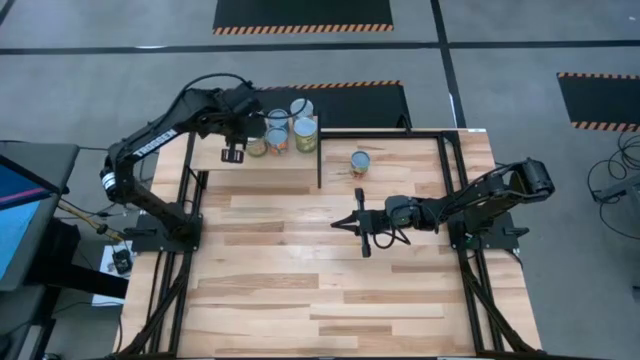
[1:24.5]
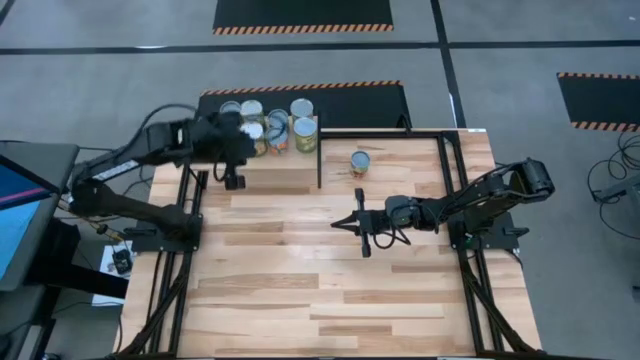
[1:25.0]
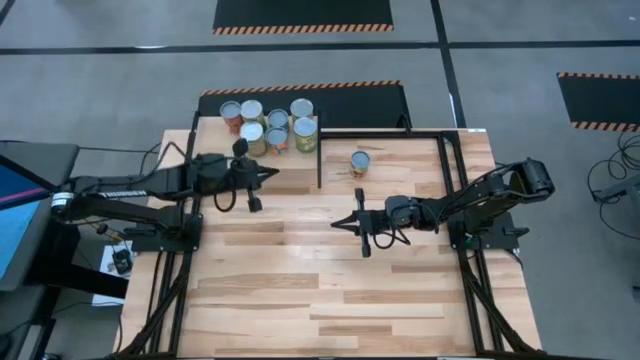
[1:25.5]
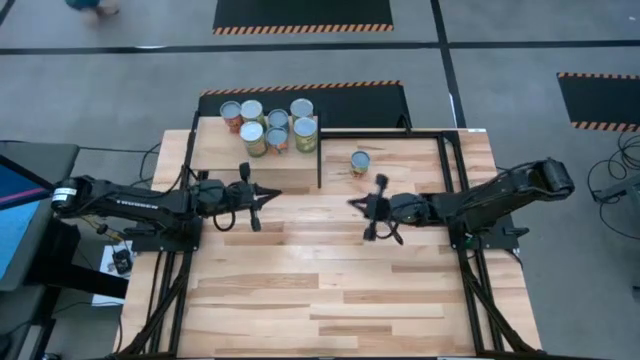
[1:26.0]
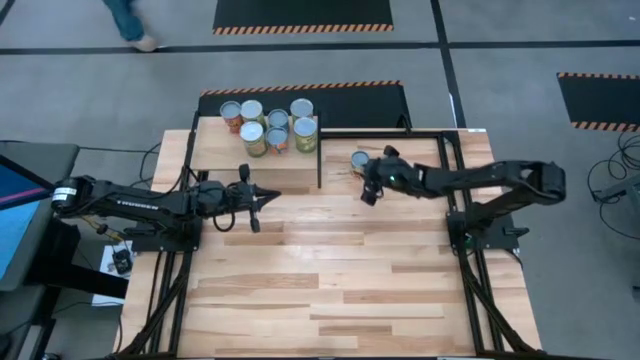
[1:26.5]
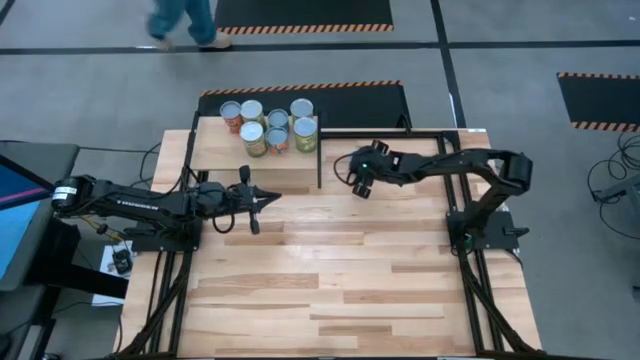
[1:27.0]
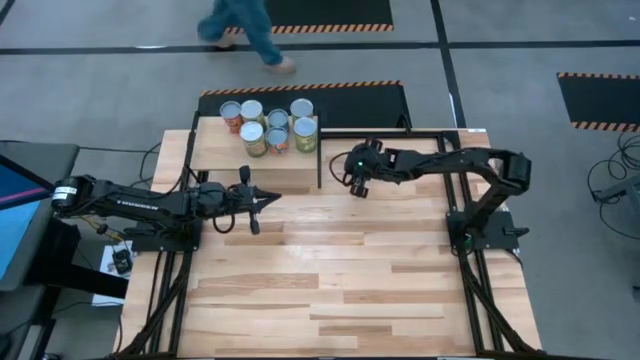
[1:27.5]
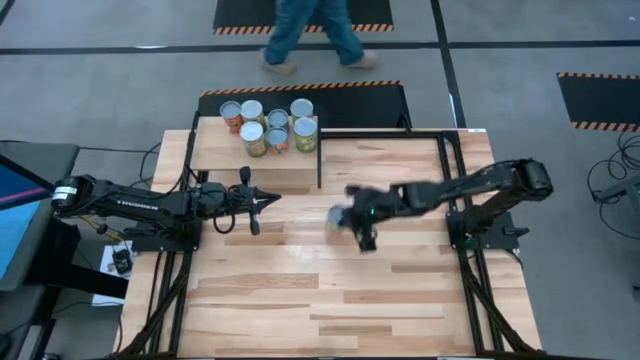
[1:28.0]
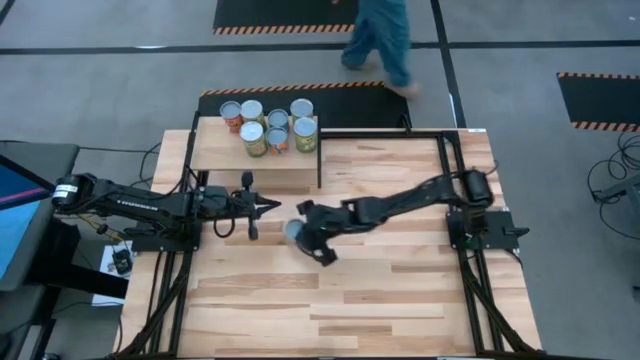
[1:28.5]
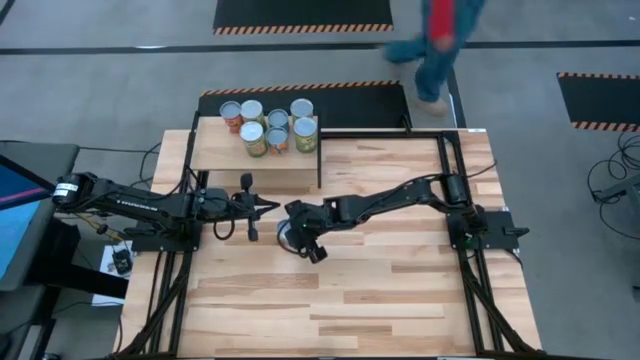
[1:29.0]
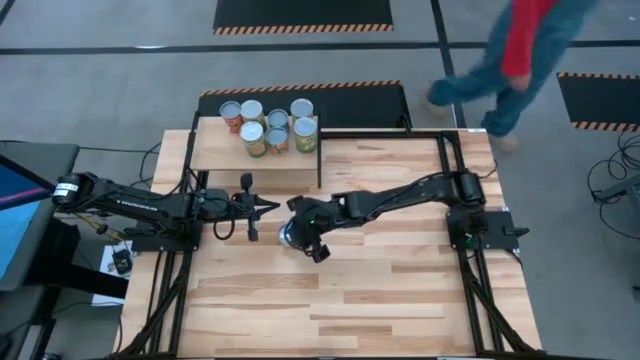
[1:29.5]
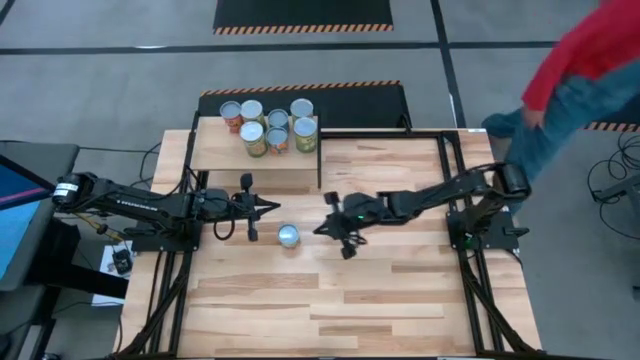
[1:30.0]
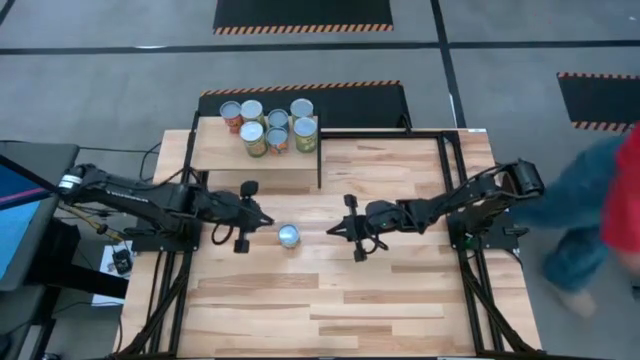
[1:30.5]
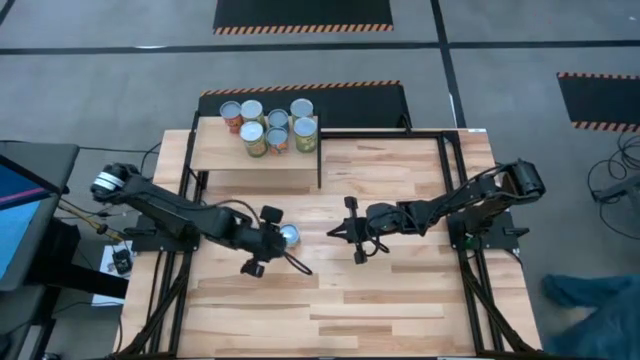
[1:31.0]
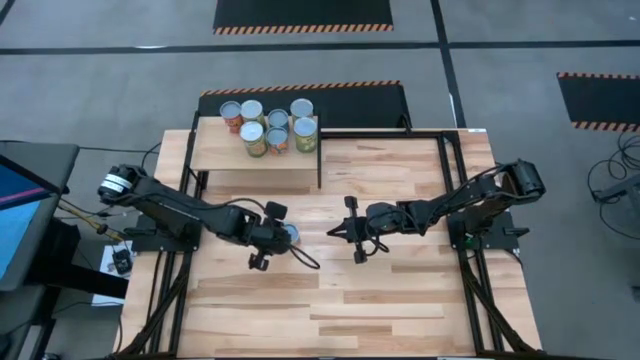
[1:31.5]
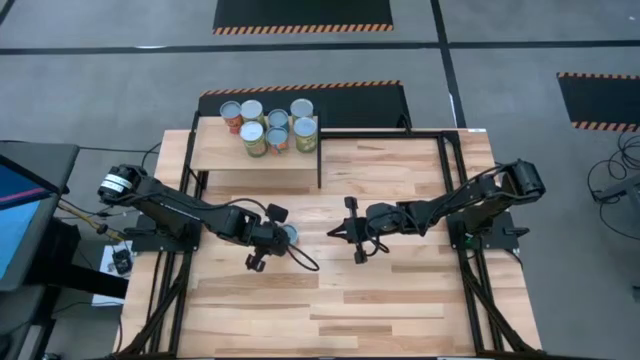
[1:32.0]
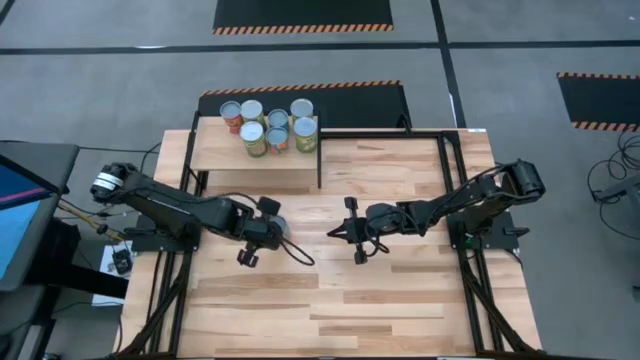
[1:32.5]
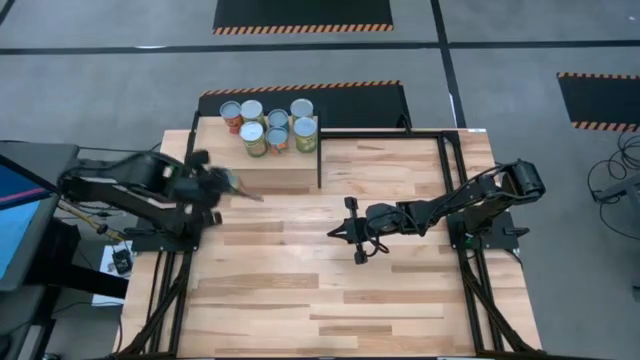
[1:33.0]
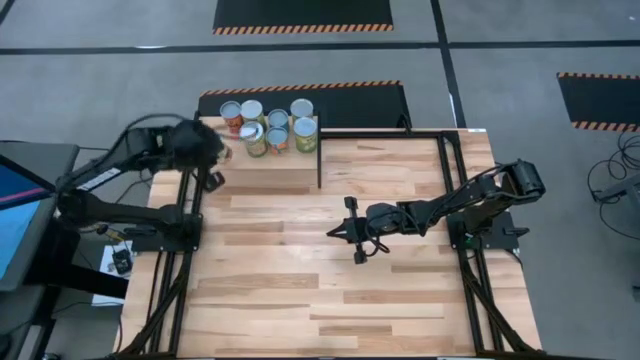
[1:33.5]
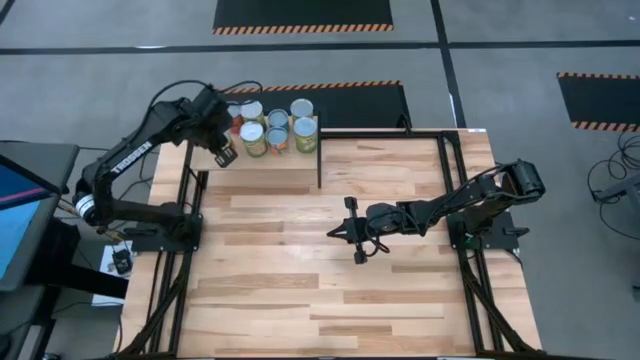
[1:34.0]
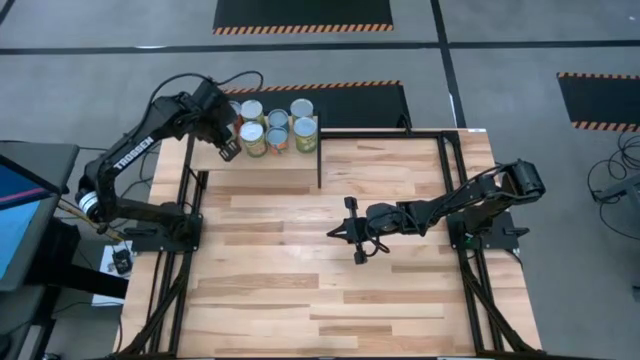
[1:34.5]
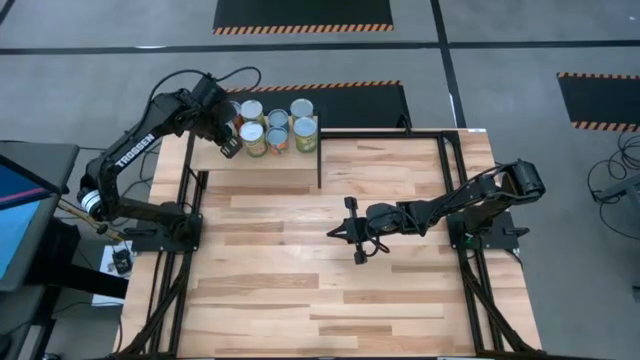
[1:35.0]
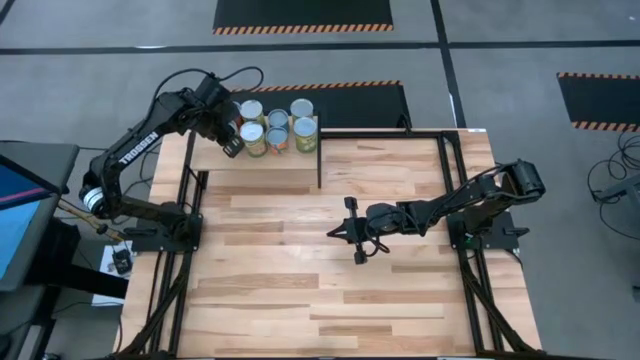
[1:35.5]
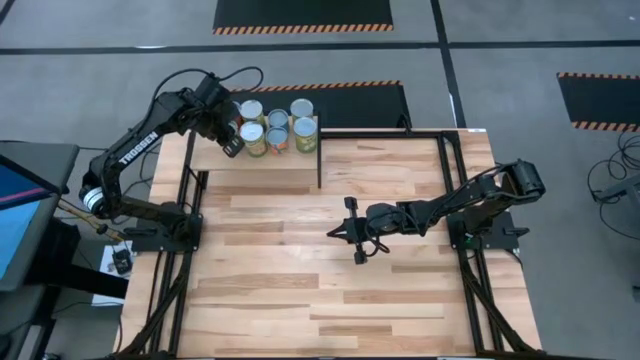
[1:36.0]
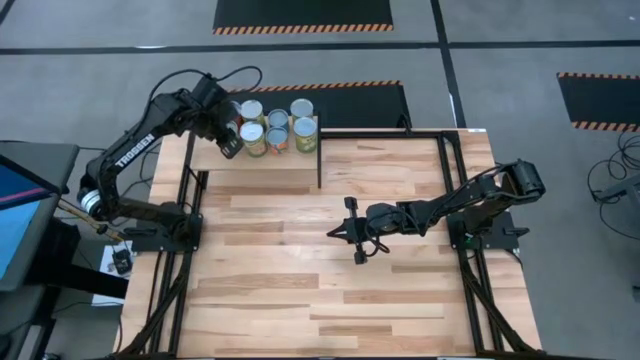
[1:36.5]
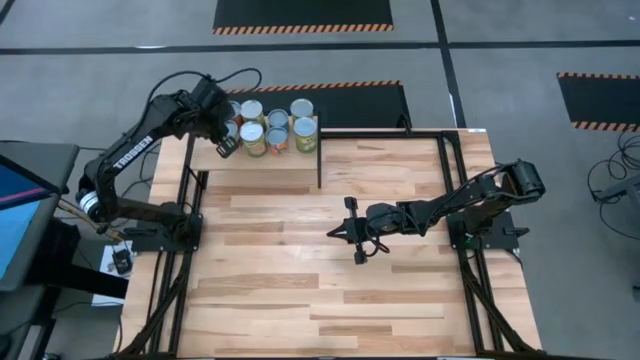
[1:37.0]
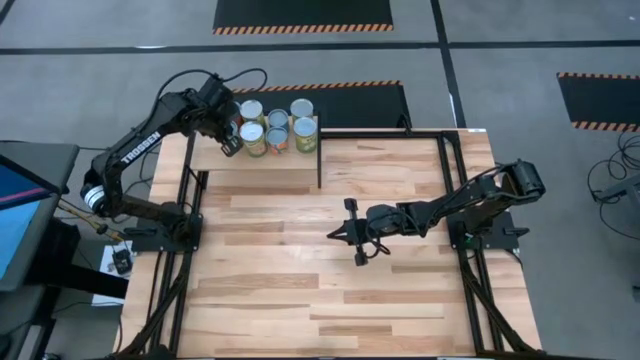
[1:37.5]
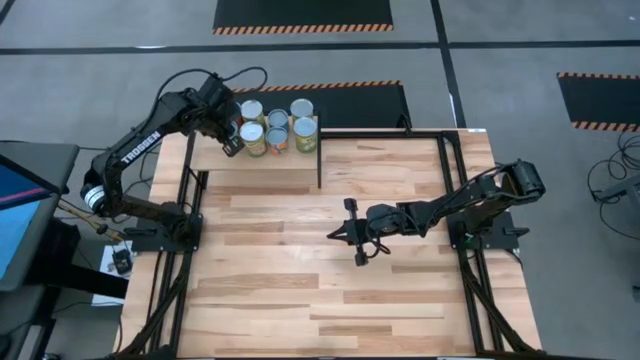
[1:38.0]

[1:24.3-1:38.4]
Task: Pick and place cans onto a shelf
Put the canned spaghetti sauce on the shelf

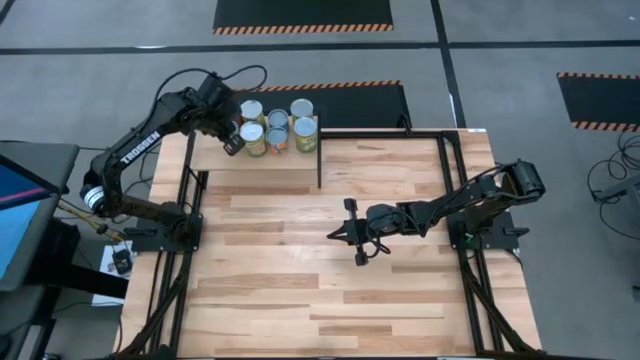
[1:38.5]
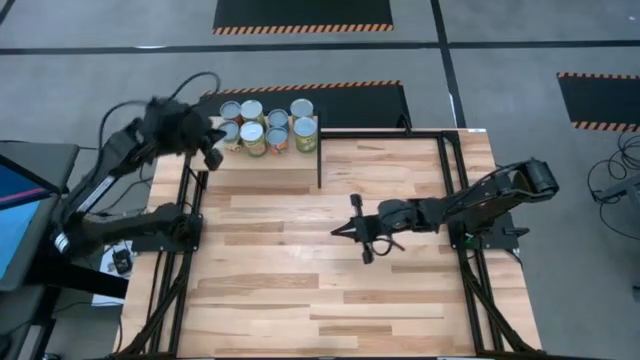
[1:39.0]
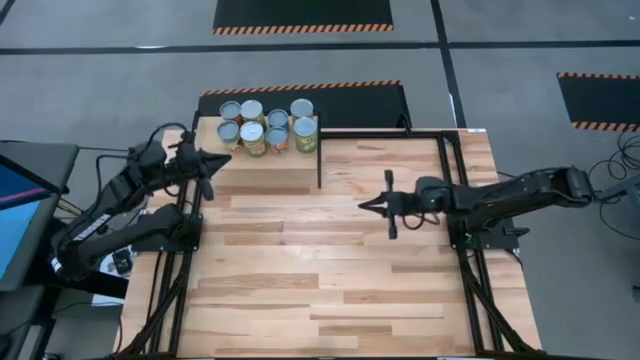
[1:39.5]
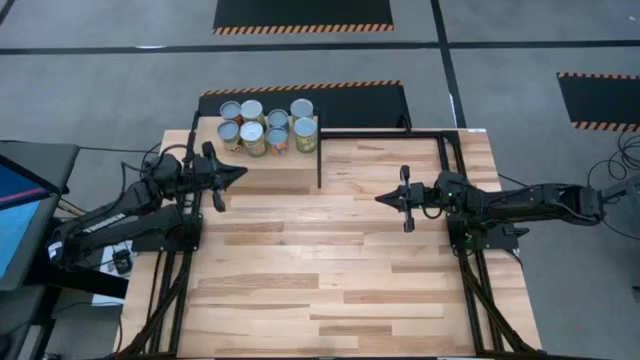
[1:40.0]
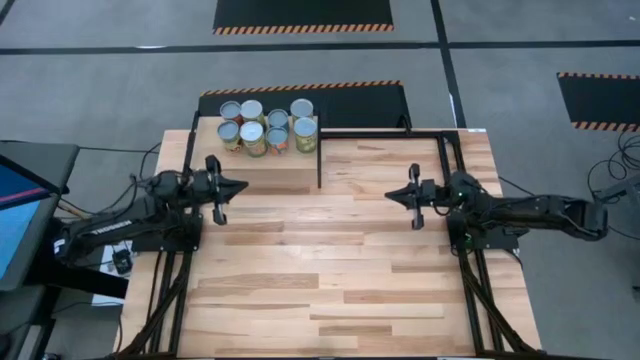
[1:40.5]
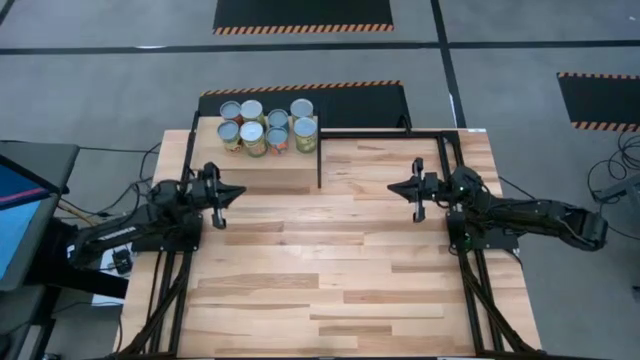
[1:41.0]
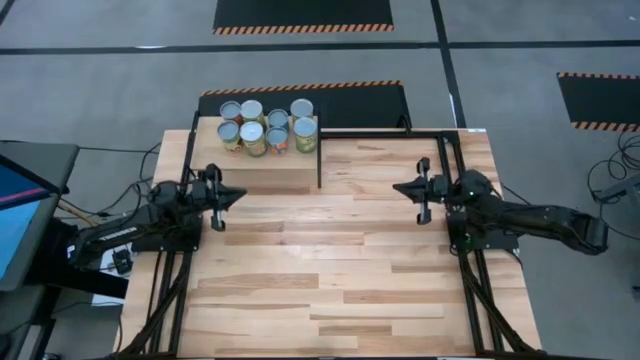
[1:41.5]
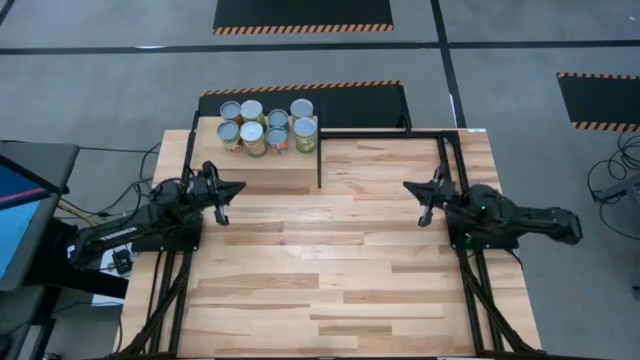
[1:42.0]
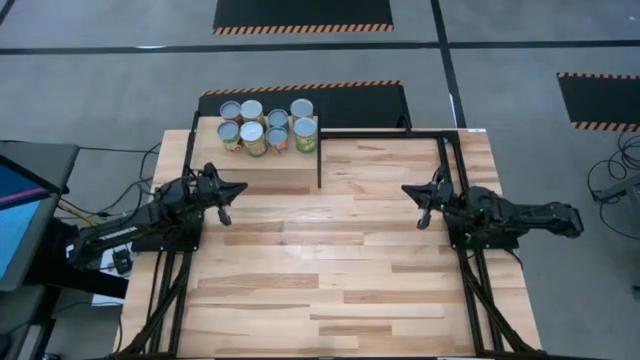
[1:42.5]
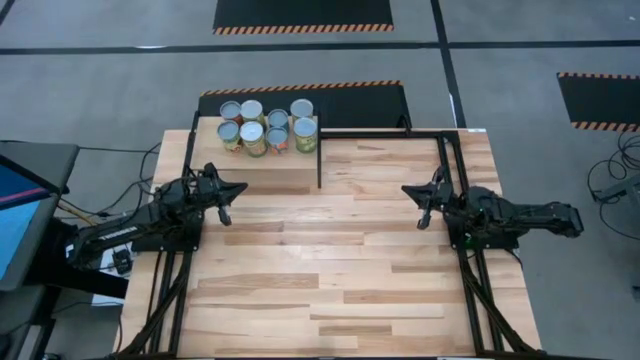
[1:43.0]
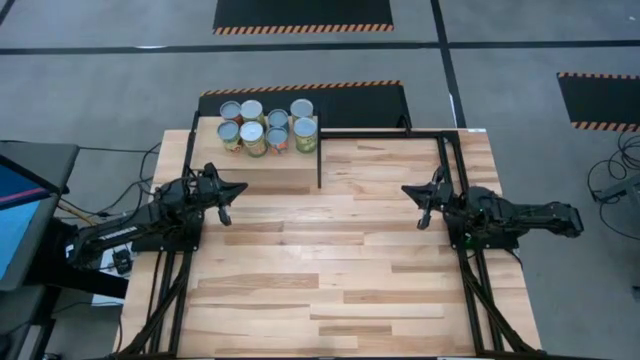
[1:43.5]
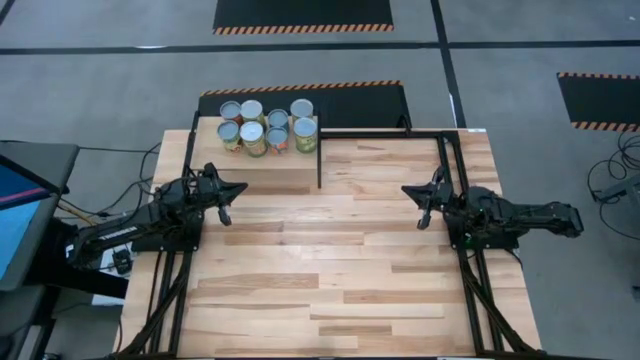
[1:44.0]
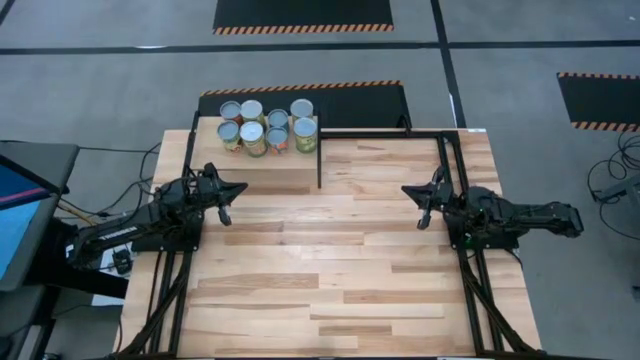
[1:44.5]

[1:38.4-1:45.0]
Return to Home Position

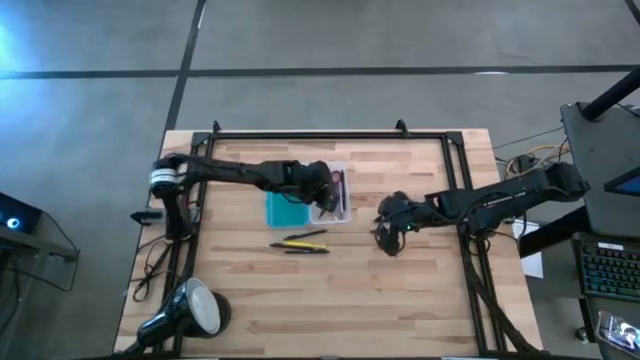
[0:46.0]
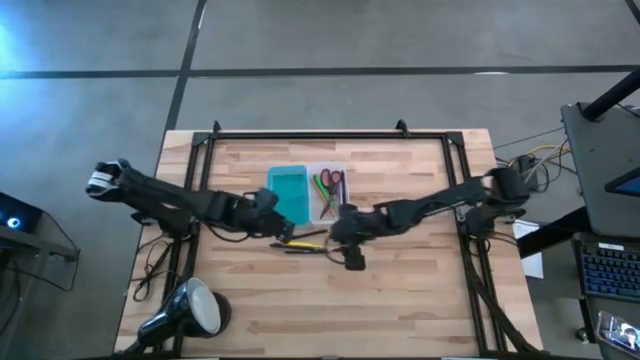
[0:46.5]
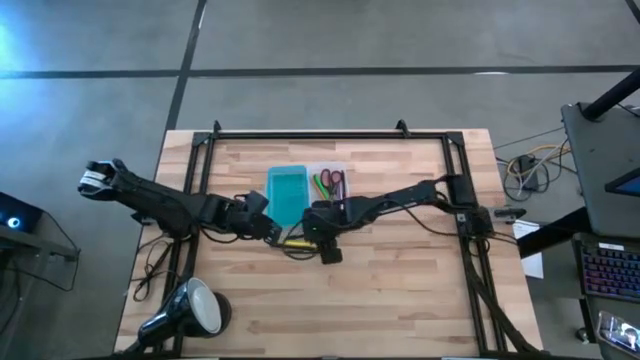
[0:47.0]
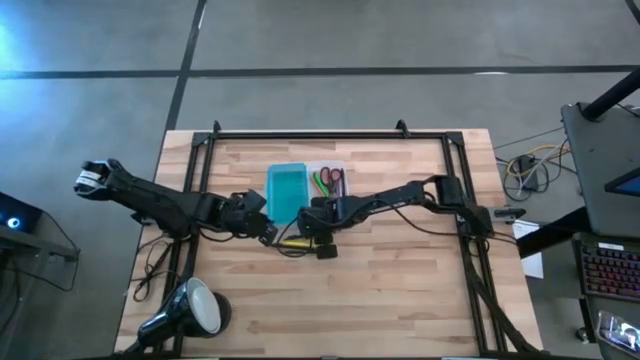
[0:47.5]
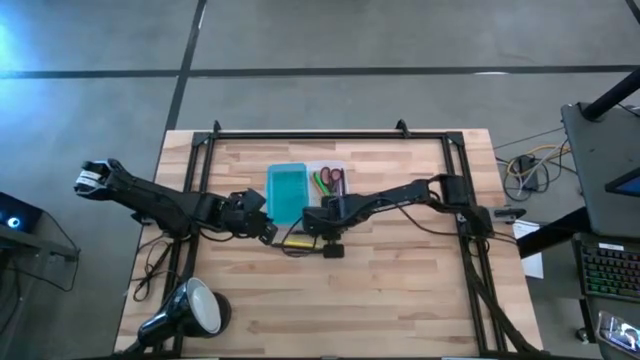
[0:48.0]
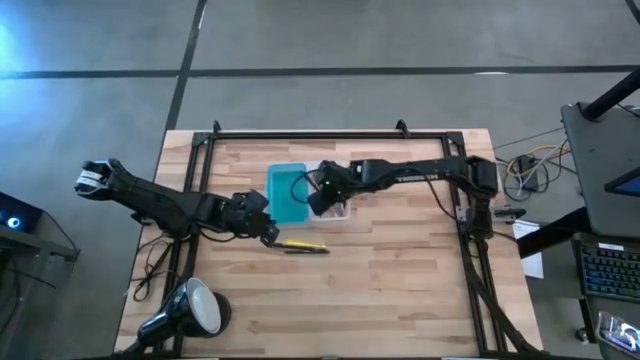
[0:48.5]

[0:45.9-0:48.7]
Task: Pick & place school supplies into a supply box
Put the black pen into the blue supply box
